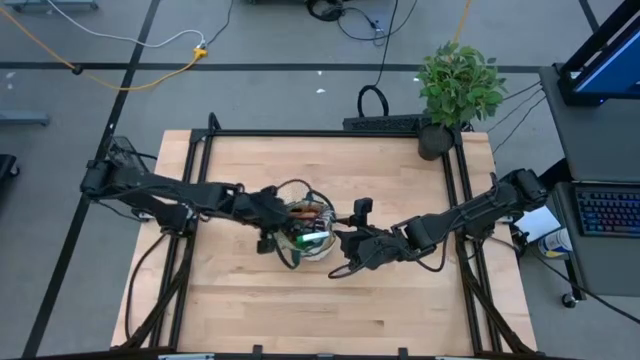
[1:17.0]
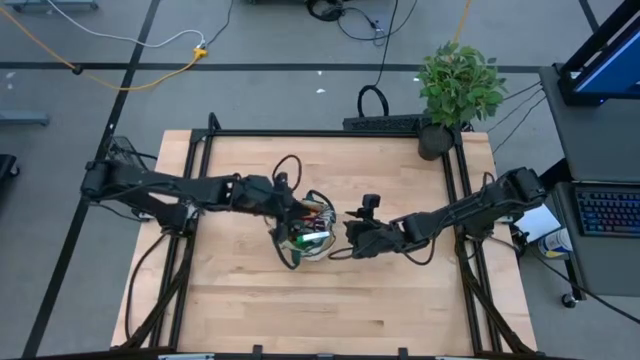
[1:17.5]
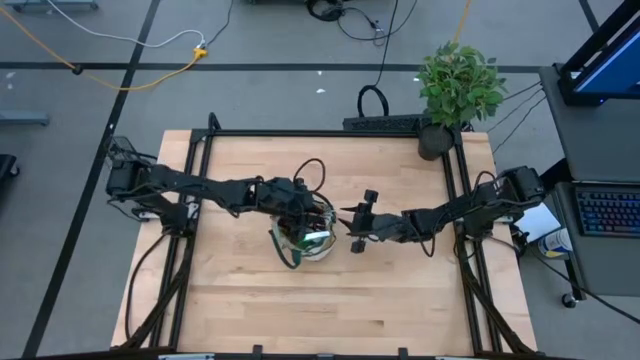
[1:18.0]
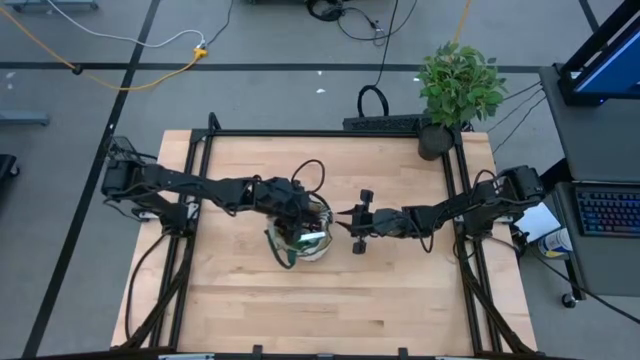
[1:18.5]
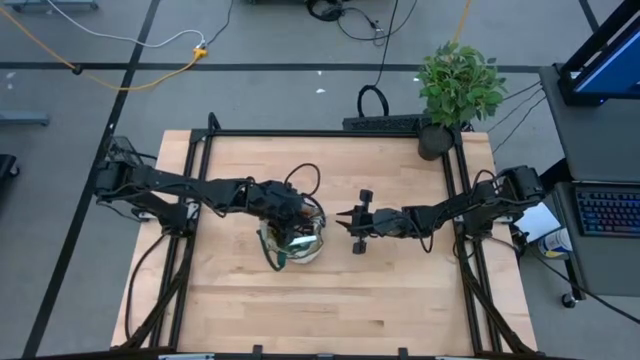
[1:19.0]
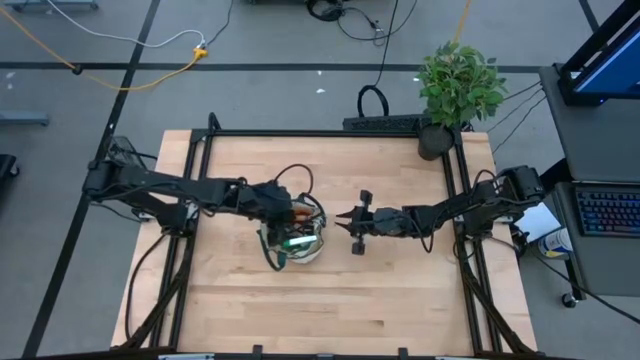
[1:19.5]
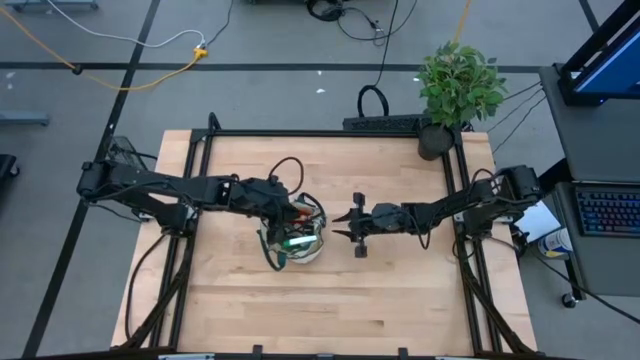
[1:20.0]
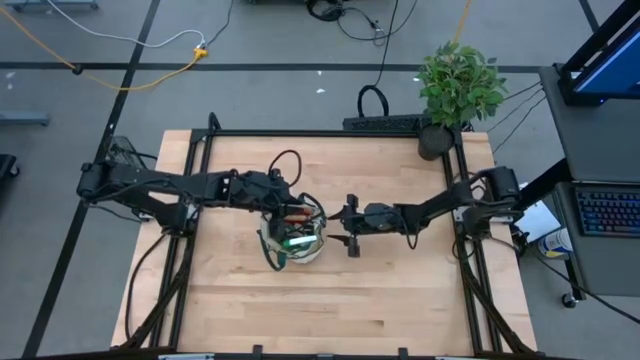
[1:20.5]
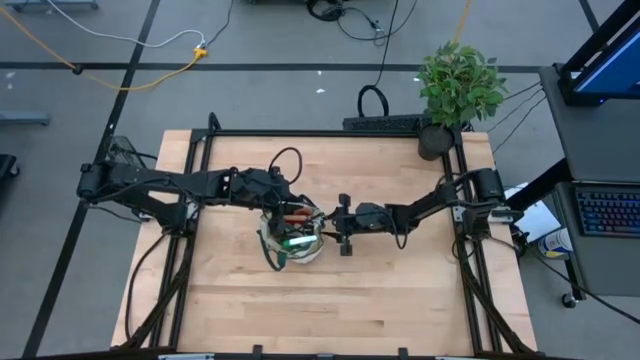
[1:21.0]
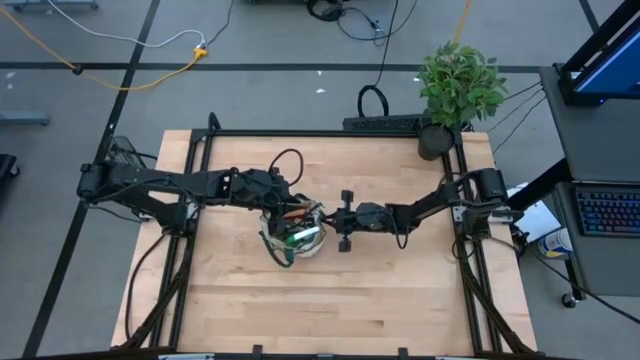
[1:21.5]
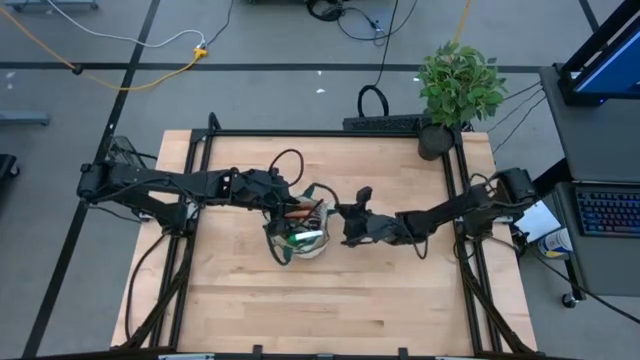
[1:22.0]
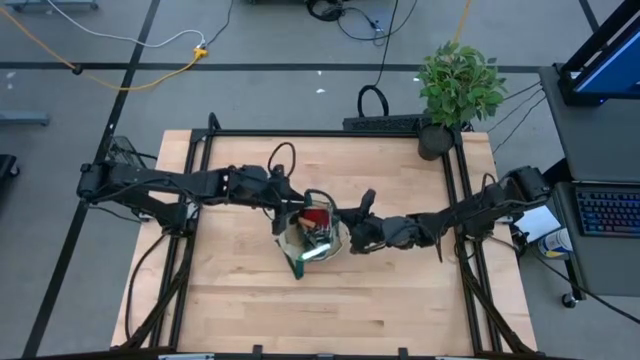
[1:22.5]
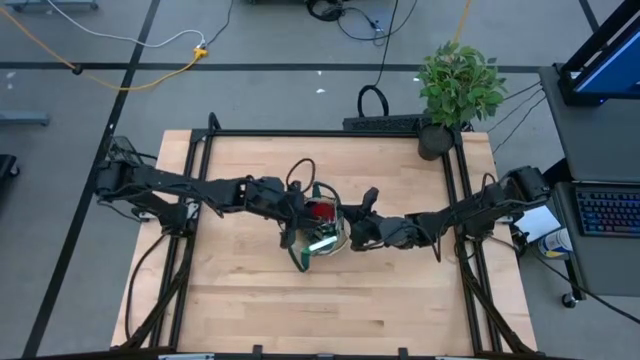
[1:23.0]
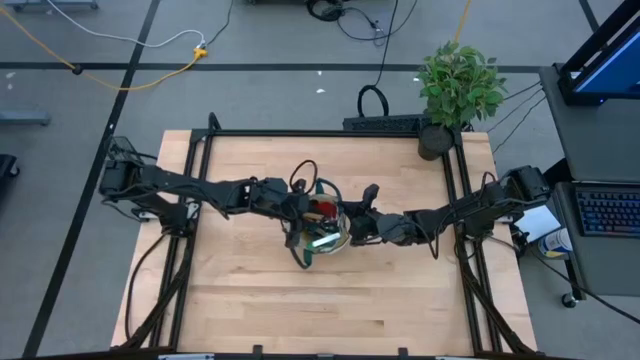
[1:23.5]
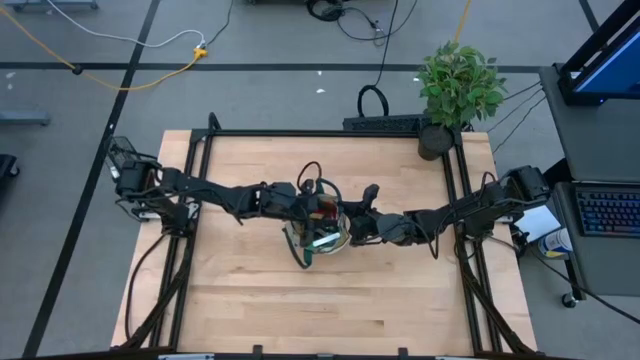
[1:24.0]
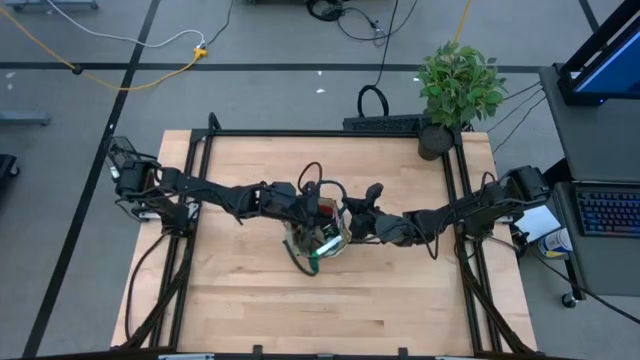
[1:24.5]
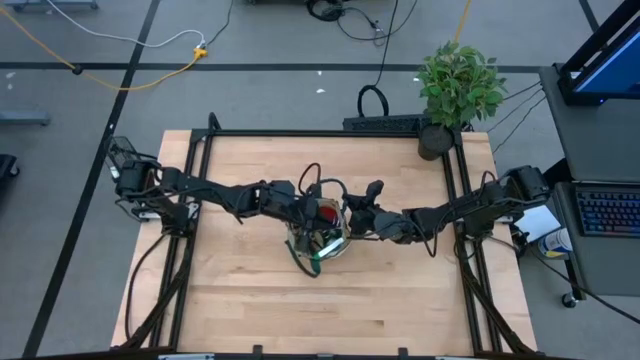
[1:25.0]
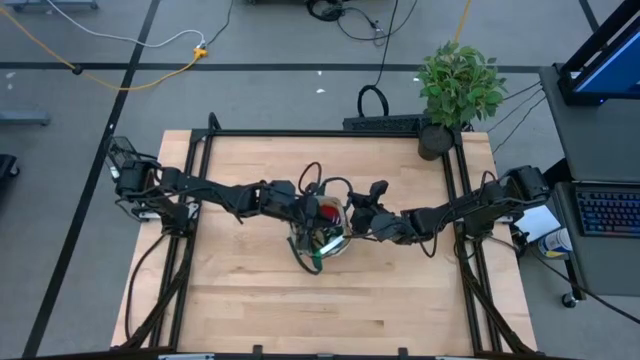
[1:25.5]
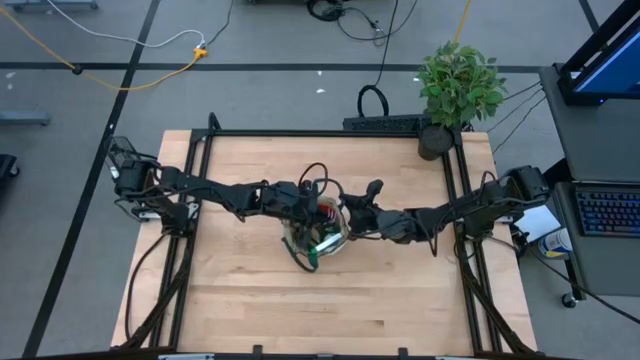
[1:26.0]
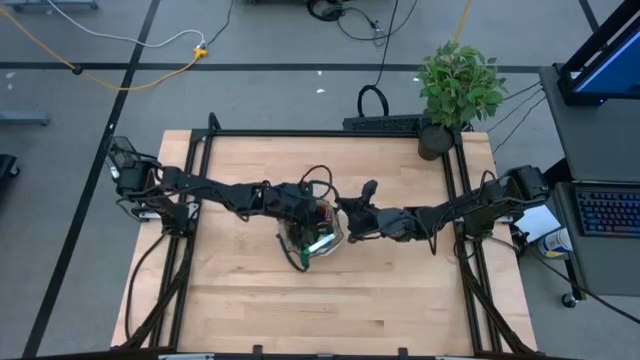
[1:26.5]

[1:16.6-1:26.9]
Task: Pick & Place Garden tools in Gardening bag
Adjust the brown hand rake in the white gardening bag

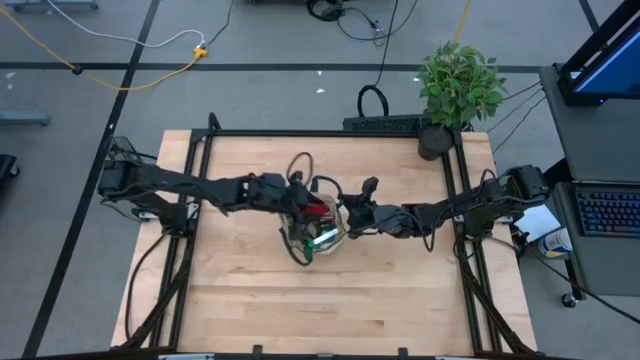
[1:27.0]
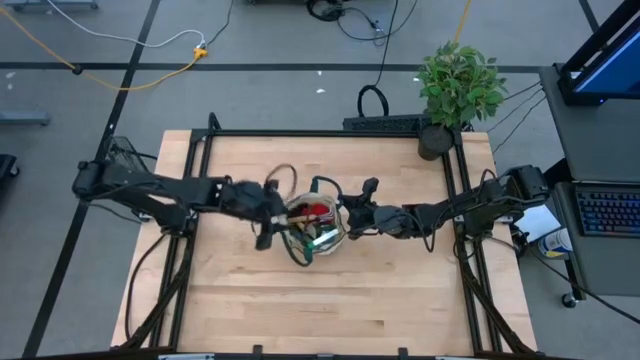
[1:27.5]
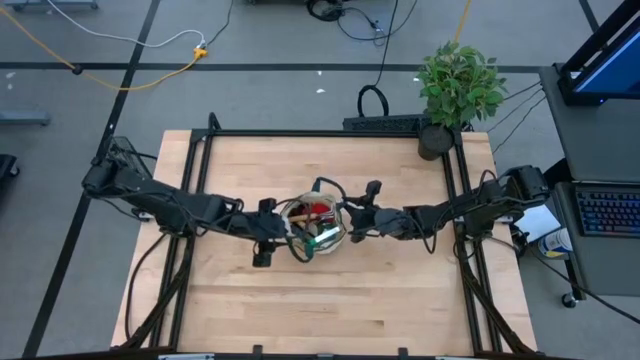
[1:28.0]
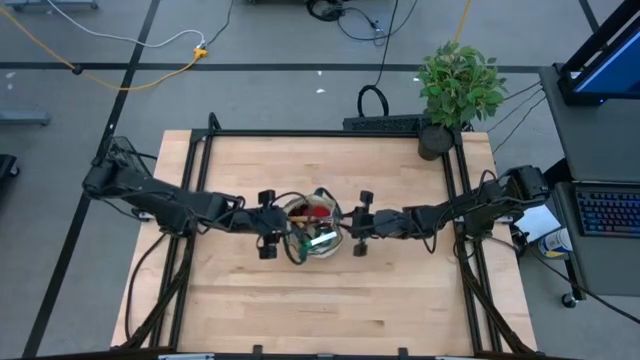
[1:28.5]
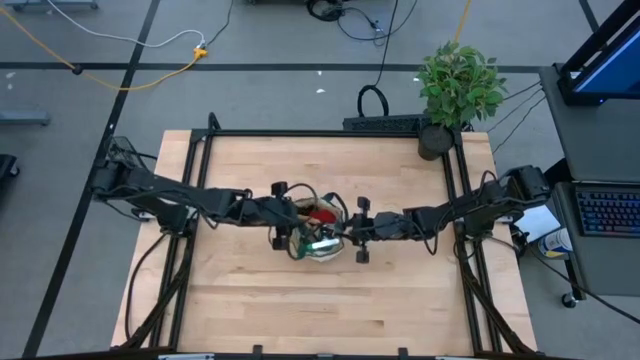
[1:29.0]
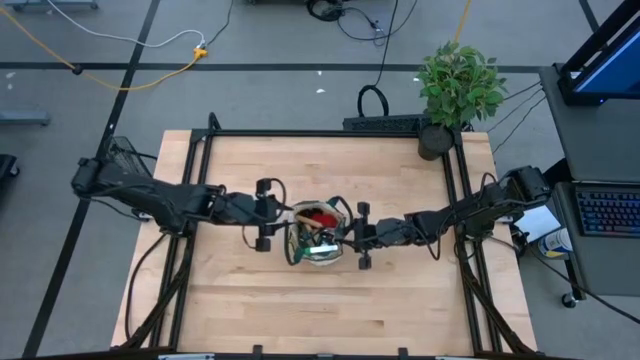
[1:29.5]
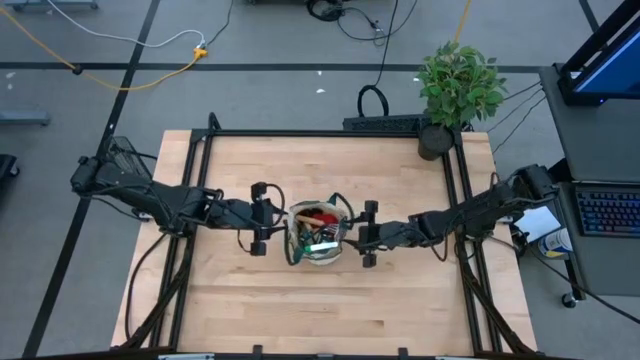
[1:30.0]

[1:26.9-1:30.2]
Adjust the white gardening bag on the table

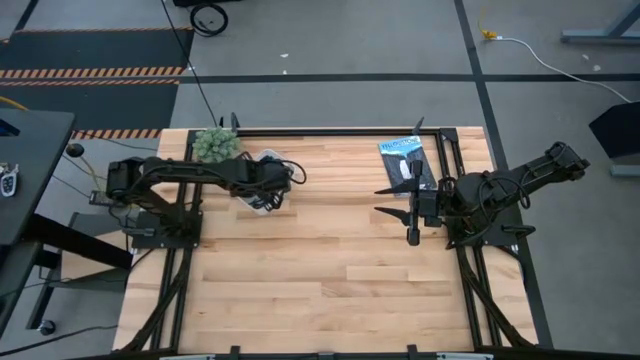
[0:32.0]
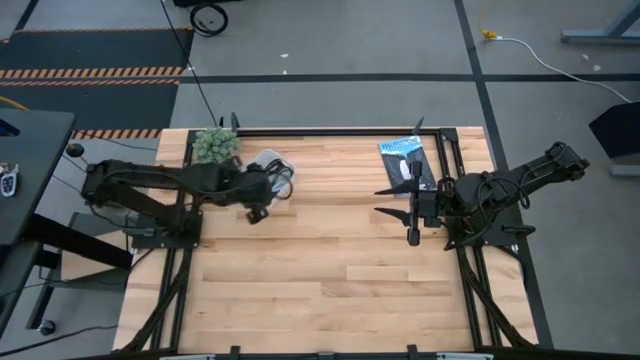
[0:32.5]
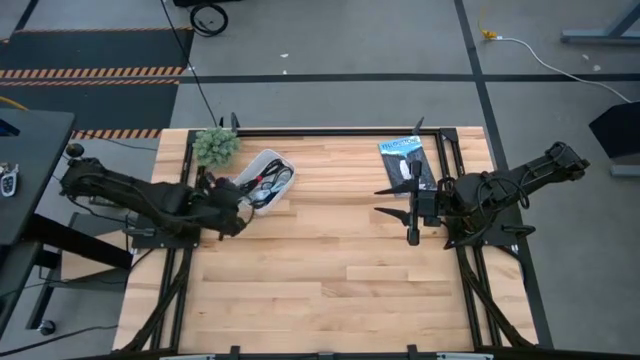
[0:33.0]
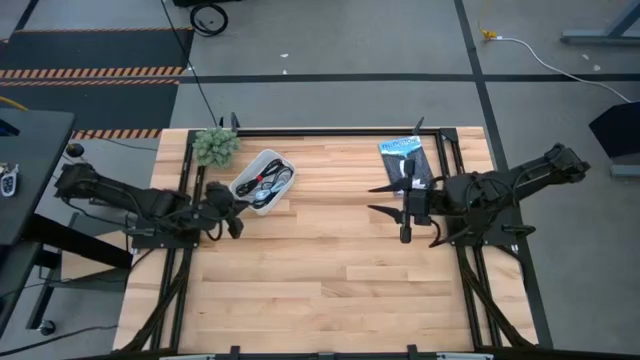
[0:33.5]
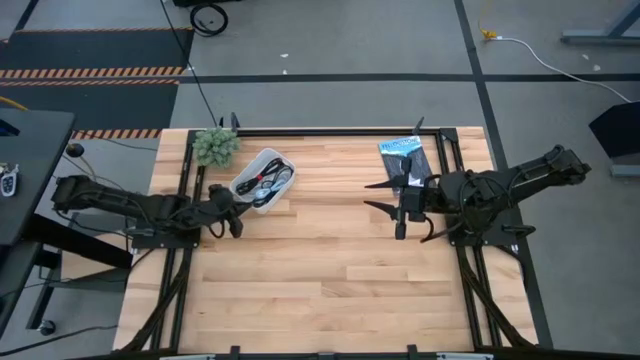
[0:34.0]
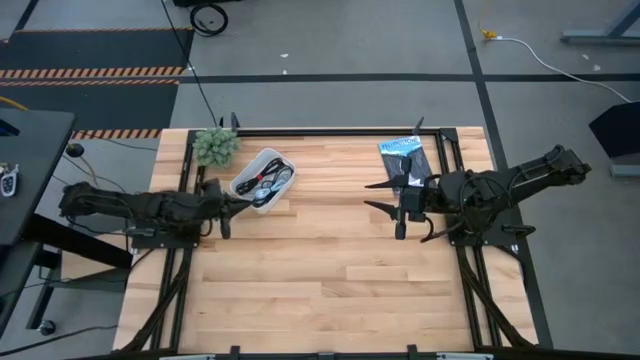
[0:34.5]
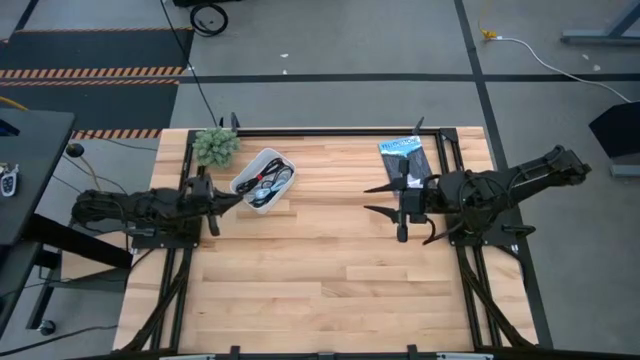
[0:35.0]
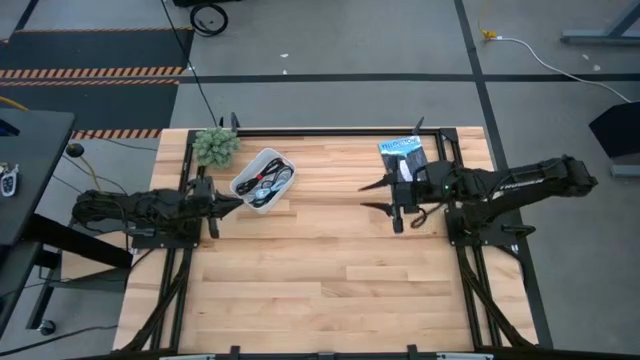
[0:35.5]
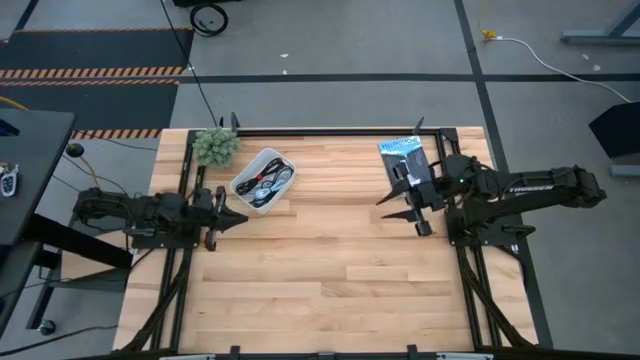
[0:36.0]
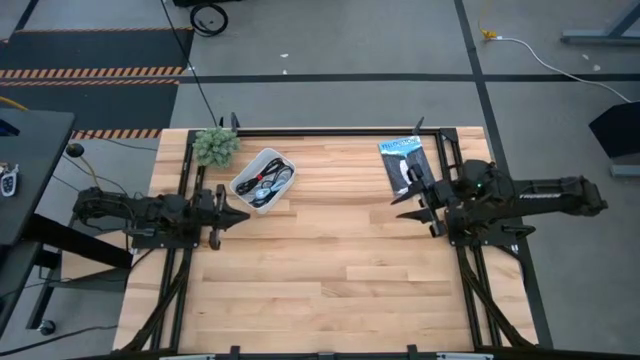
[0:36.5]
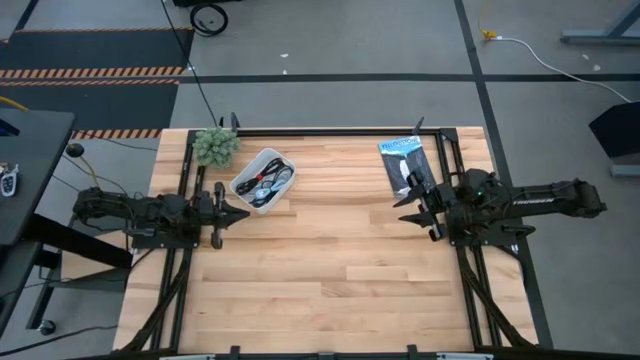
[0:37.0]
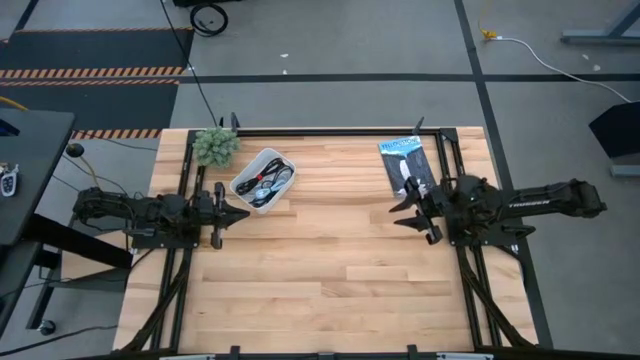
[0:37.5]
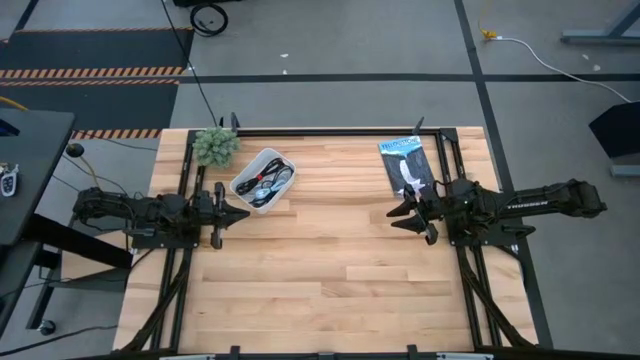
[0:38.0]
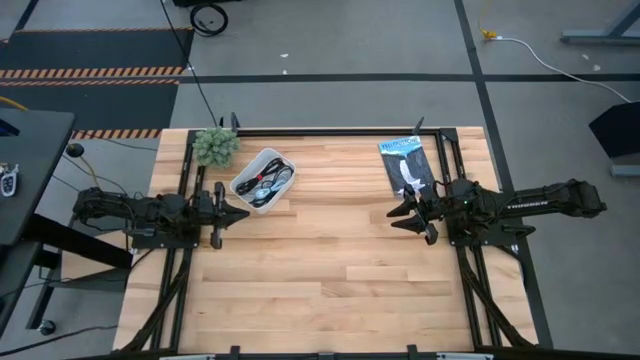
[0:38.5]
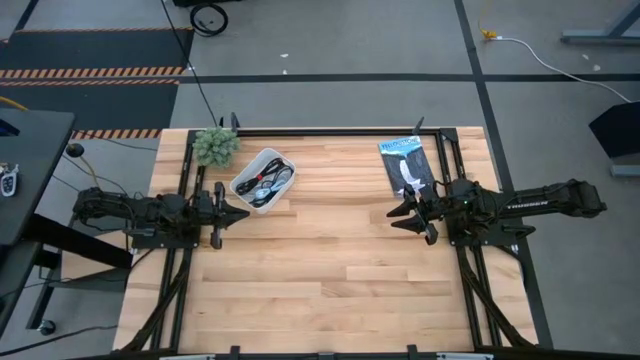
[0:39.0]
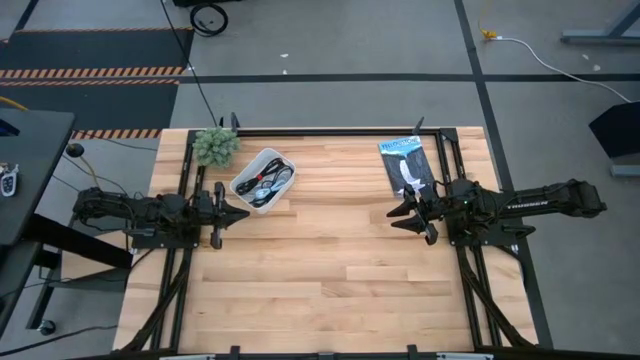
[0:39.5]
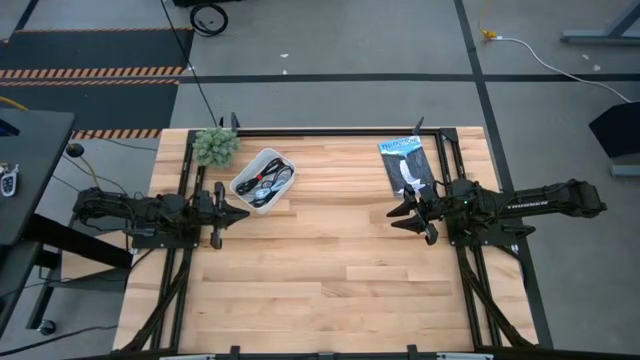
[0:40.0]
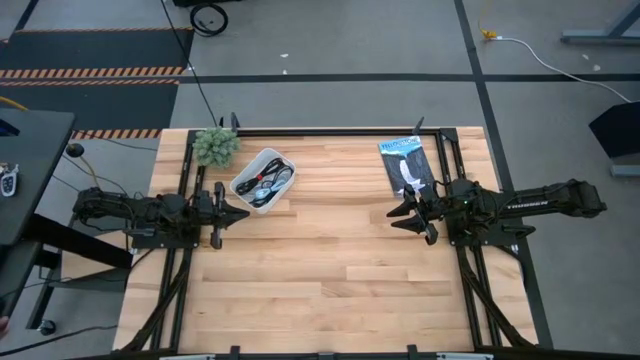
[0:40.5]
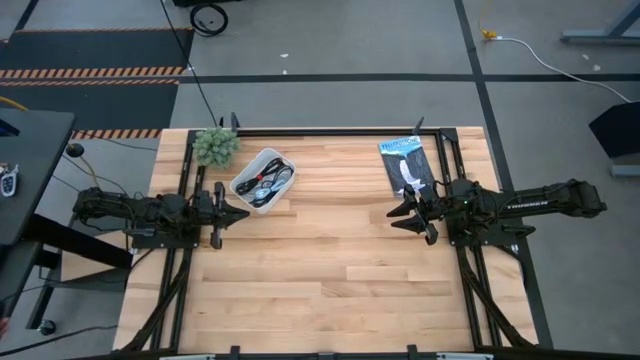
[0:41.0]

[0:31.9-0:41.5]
Task: Pick and place USB-C Cables
Return to Home Position
